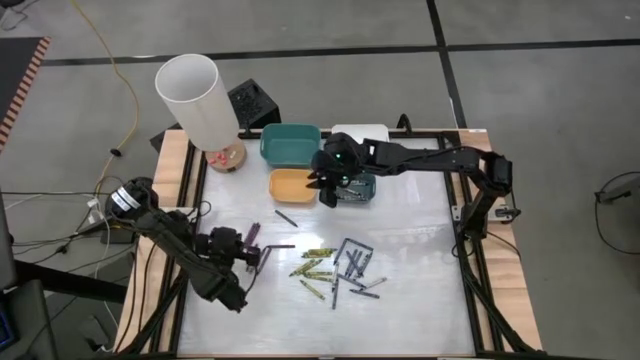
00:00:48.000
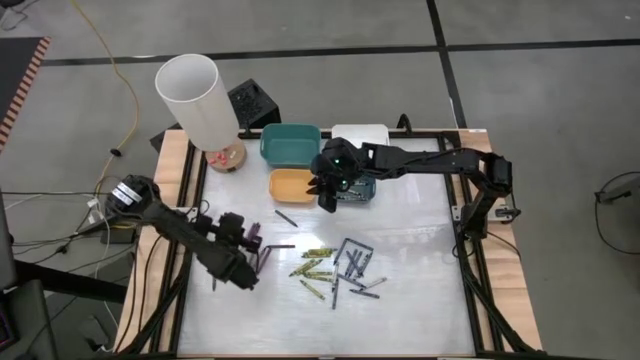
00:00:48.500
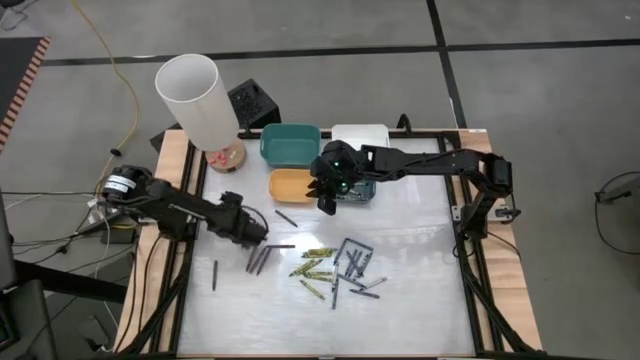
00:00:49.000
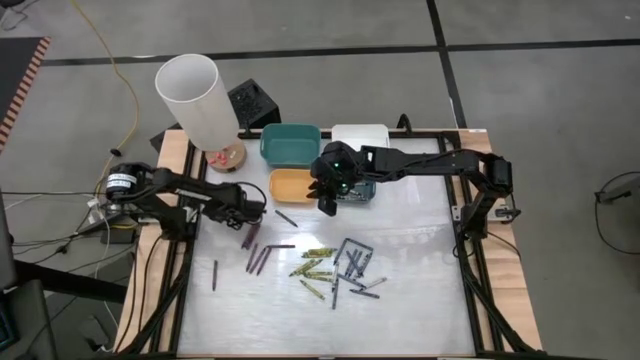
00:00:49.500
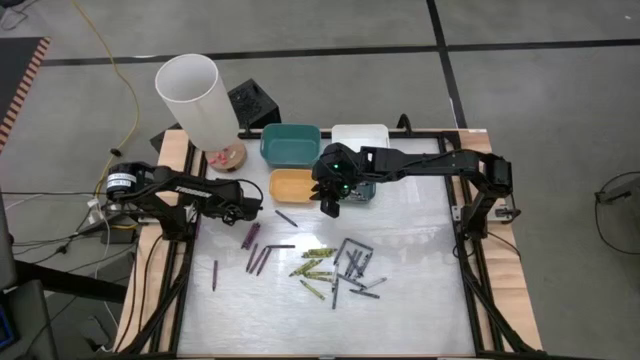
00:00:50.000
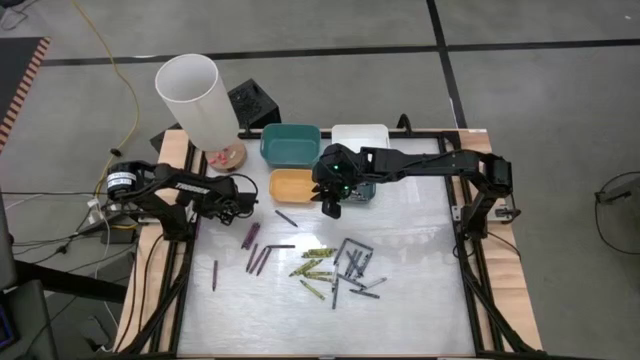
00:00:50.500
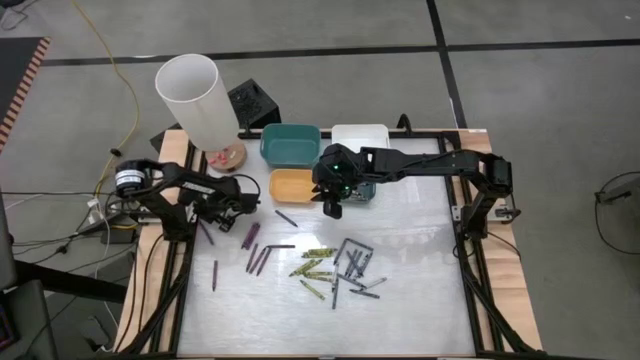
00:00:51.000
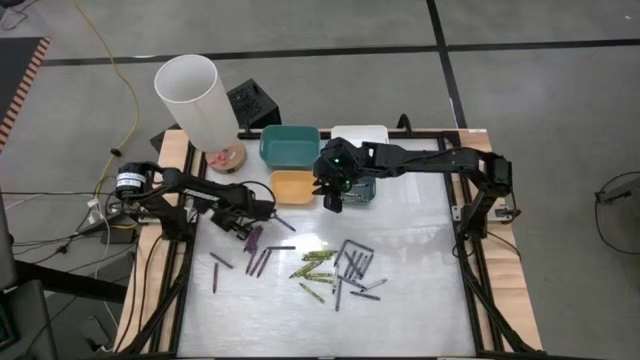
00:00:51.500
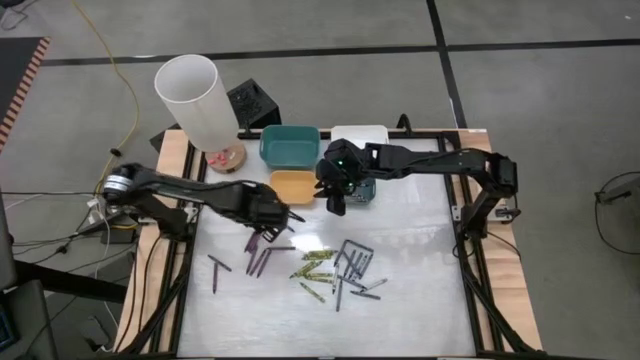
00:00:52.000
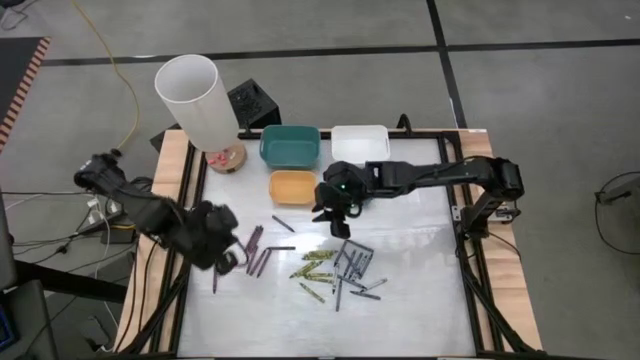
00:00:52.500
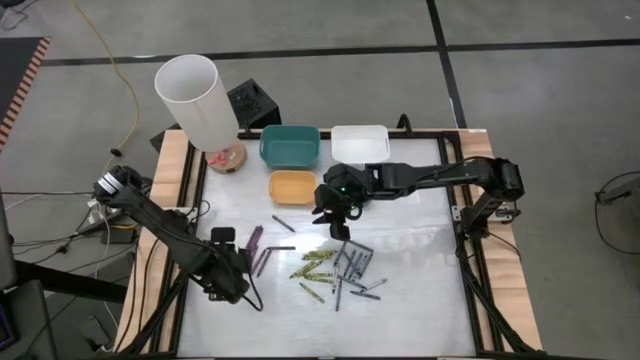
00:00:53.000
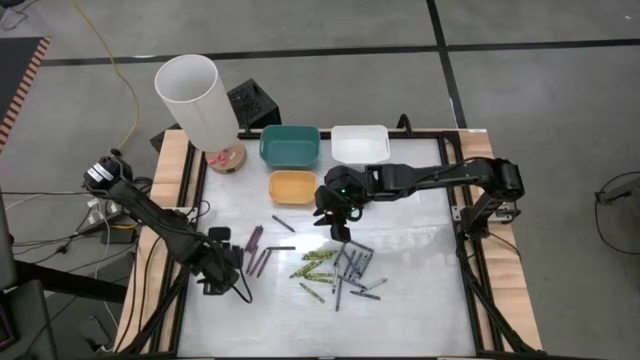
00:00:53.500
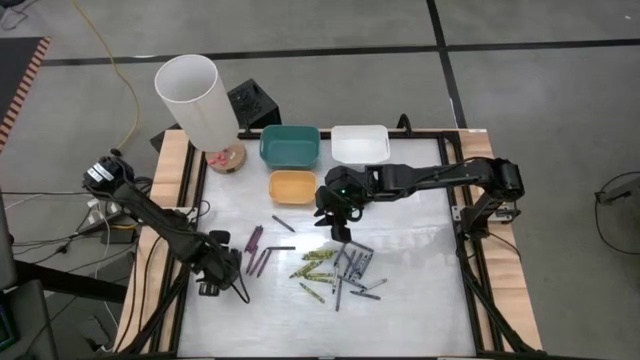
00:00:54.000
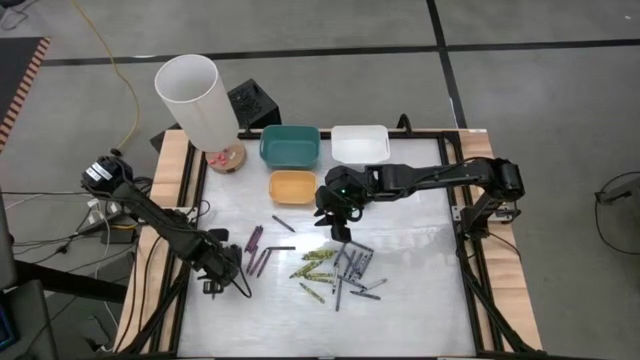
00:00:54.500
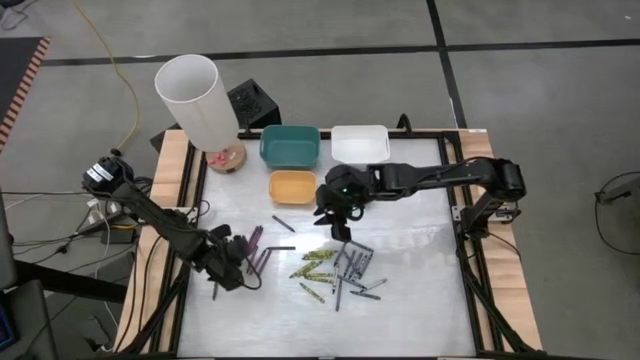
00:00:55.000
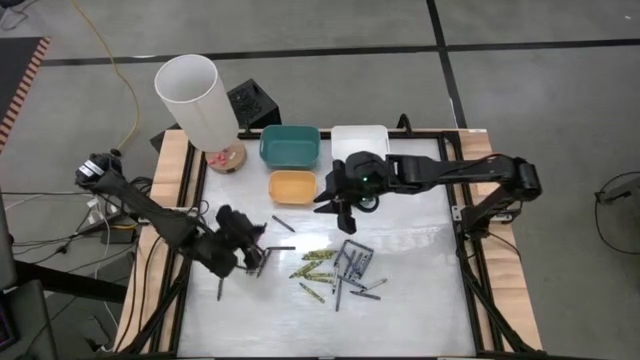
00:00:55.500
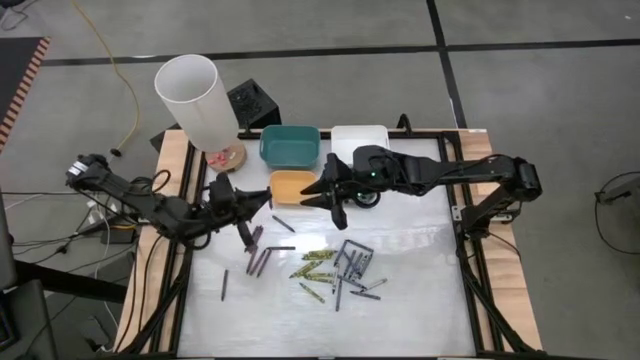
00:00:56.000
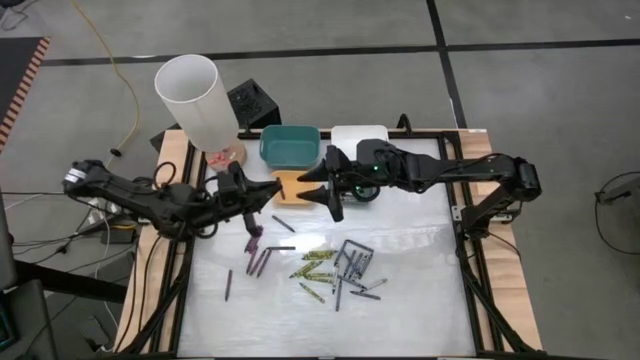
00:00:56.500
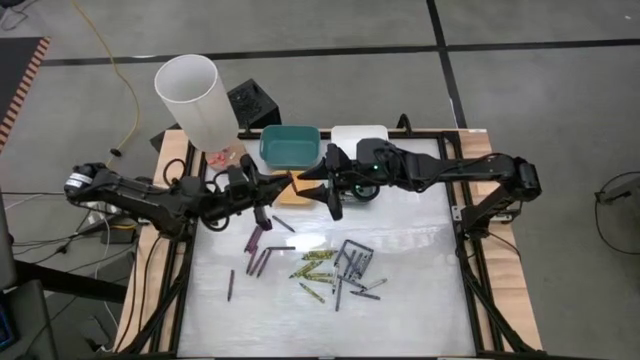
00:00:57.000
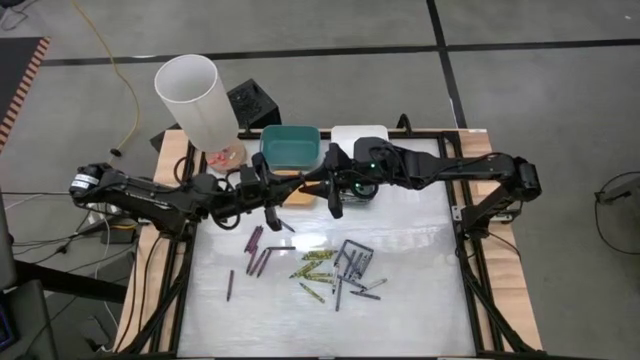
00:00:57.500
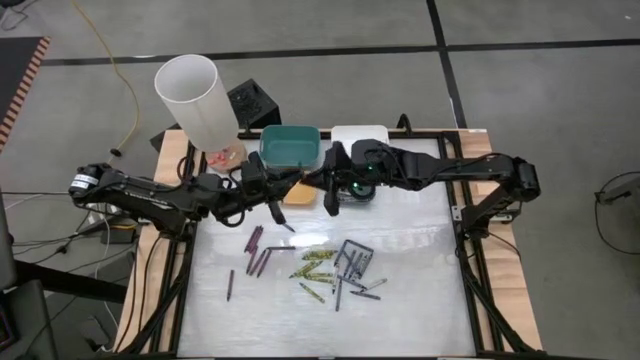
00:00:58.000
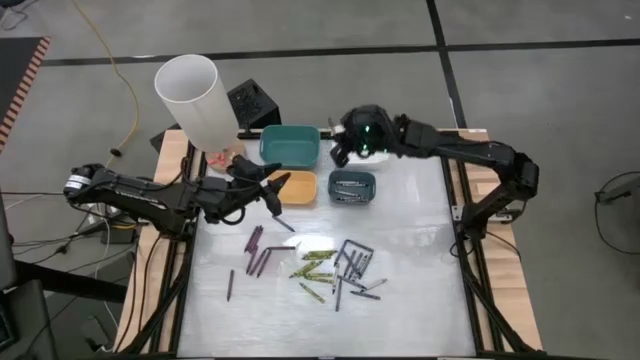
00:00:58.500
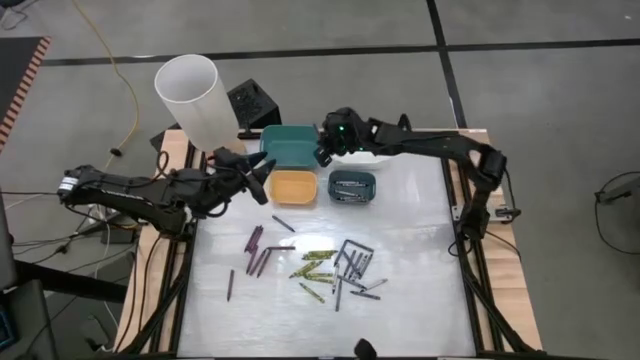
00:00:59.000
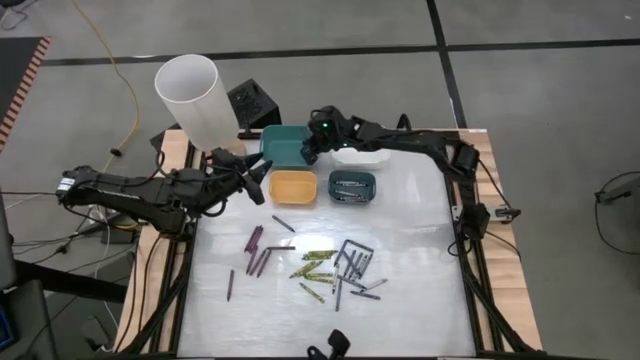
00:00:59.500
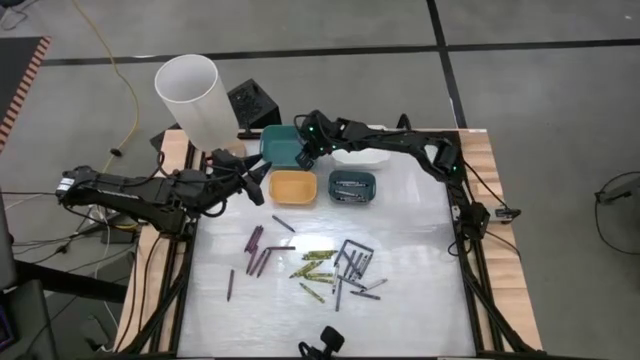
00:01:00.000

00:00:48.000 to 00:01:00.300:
Task: Sort crayons
Put the violet crayon into the green bin

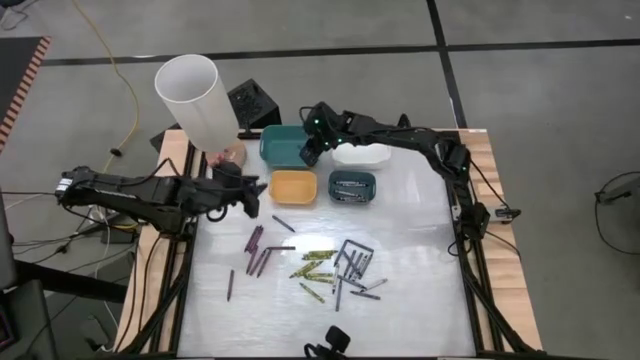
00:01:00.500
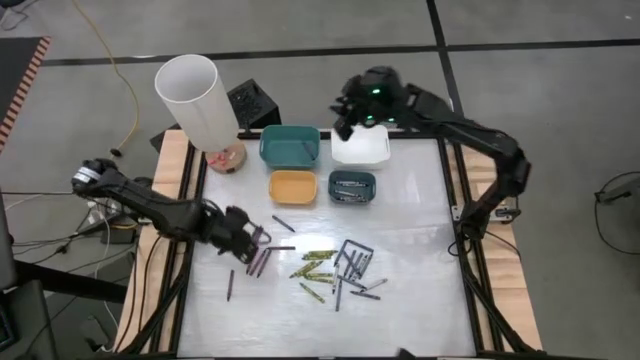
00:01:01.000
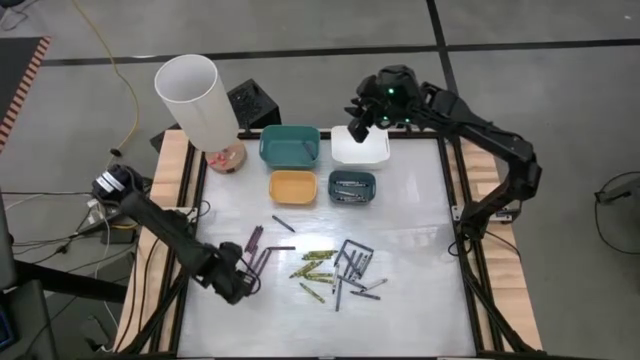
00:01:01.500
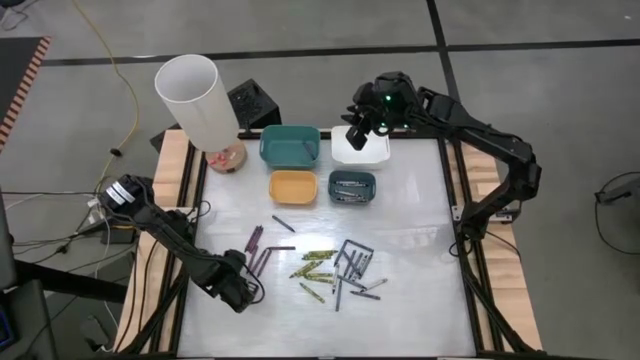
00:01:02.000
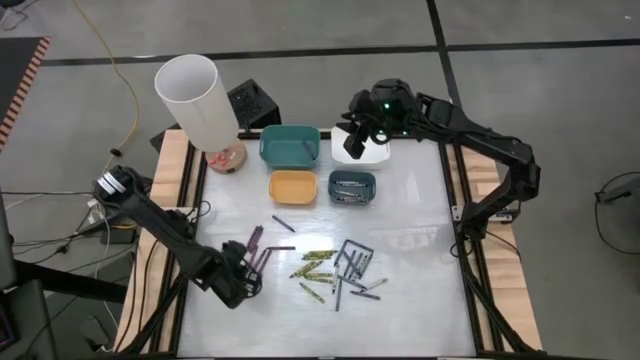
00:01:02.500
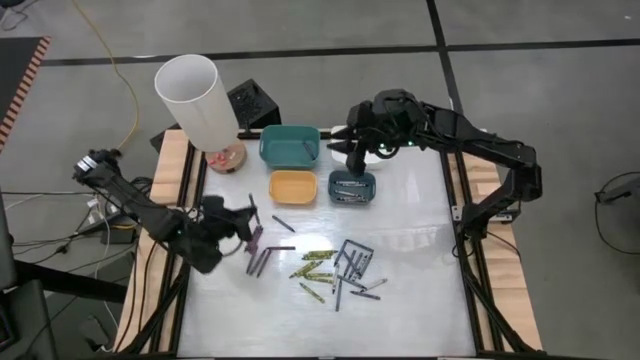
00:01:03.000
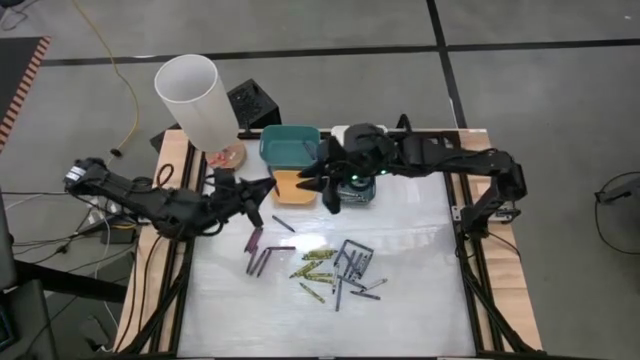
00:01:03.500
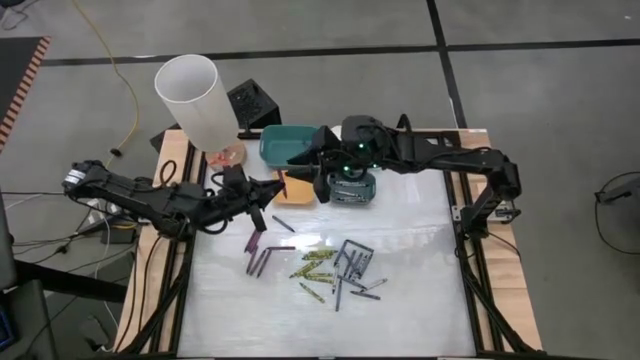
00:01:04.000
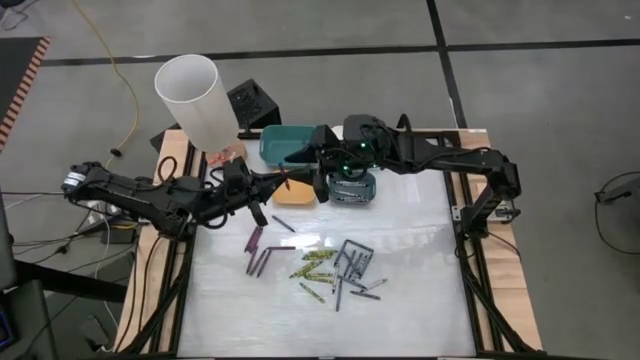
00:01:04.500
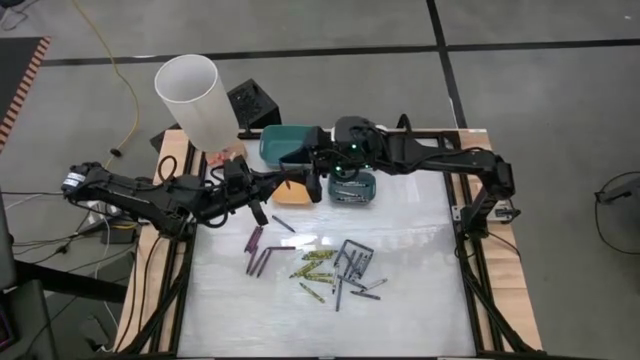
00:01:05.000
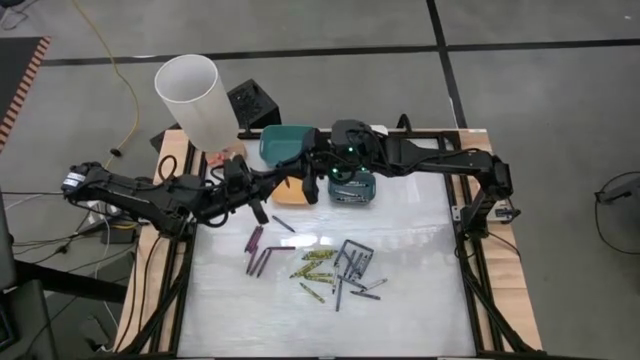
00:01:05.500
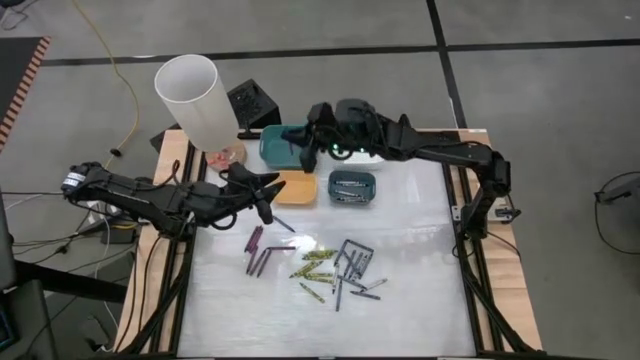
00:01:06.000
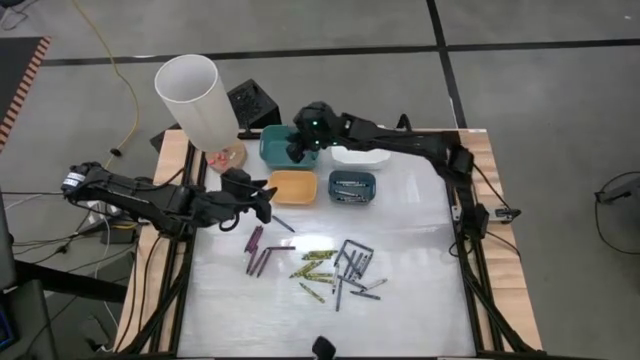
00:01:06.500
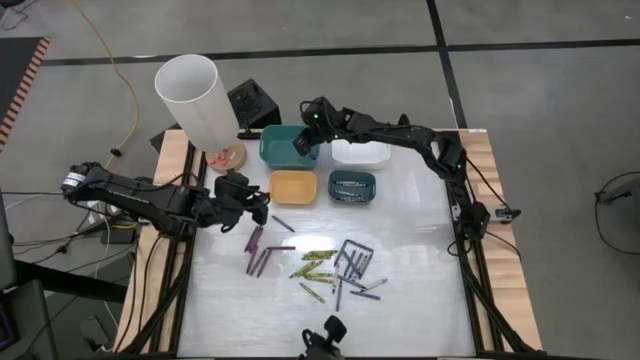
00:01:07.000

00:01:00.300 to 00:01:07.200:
Put the violet crayon into the green bin

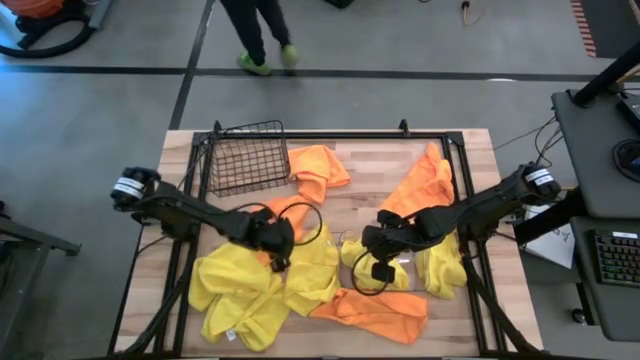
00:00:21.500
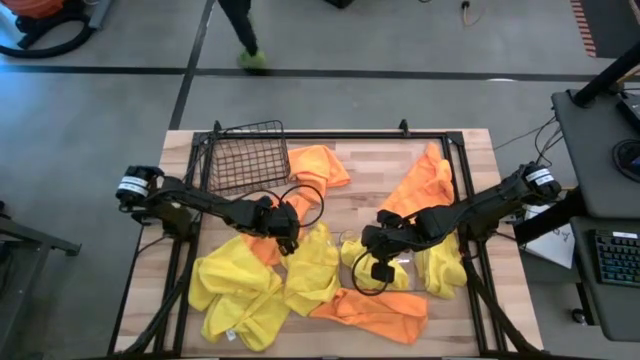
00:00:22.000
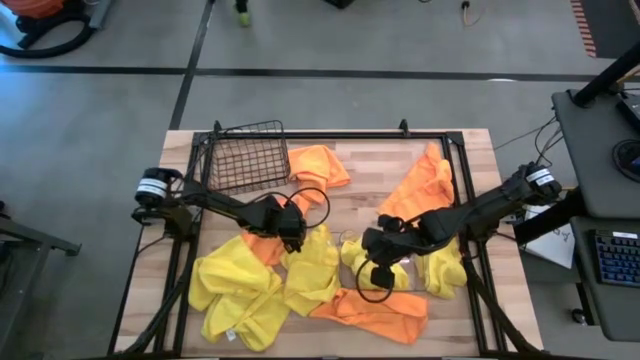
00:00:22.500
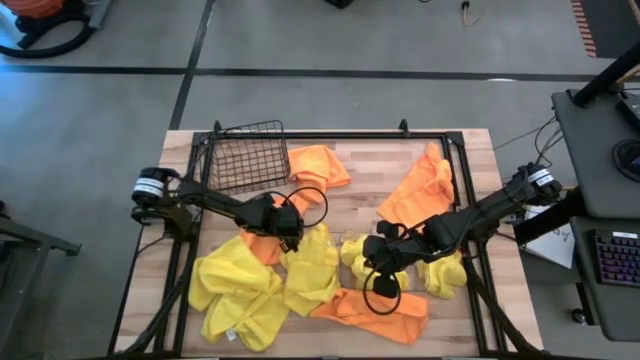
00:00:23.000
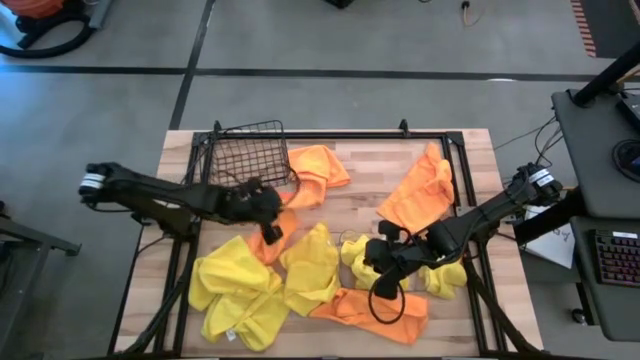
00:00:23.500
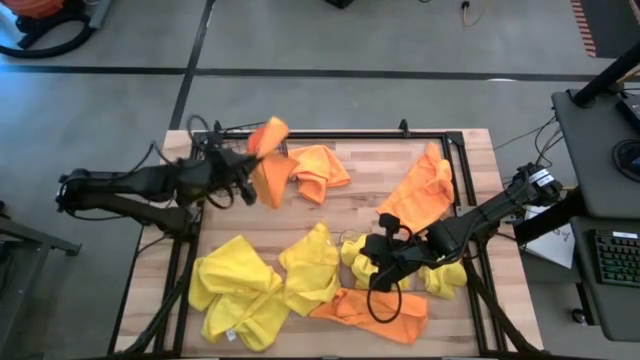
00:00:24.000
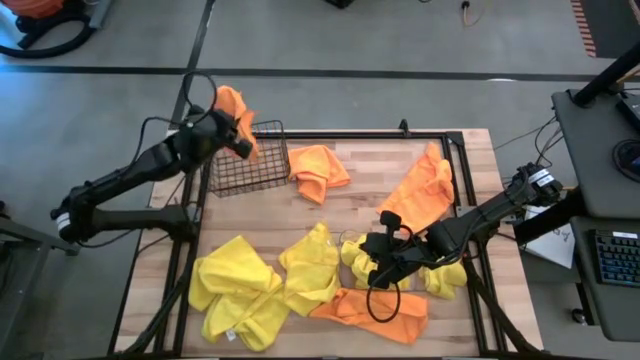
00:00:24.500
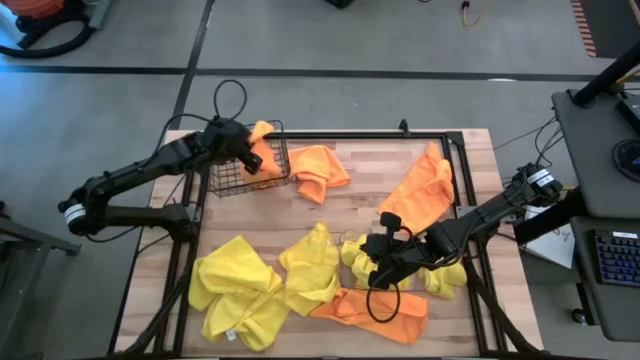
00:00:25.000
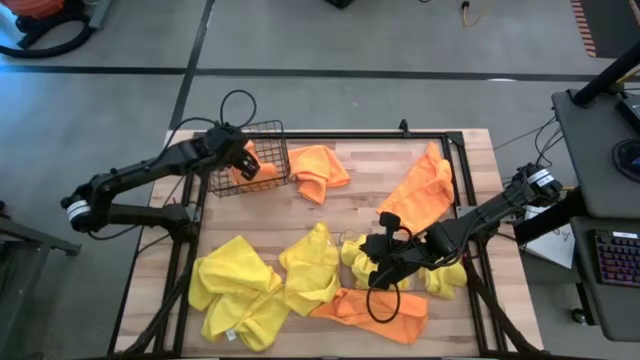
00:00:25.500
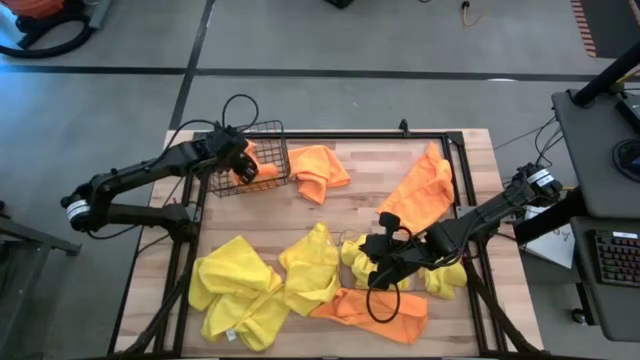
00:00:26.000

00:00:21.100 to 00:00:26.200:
Task: Sort microfiber towel by color & place in baskets
Put the orange towel into the black basket
